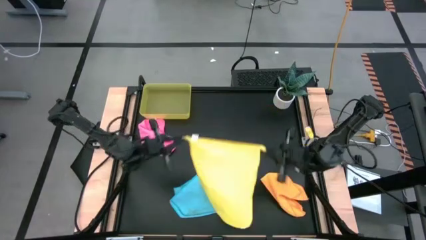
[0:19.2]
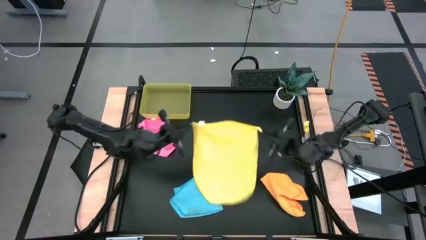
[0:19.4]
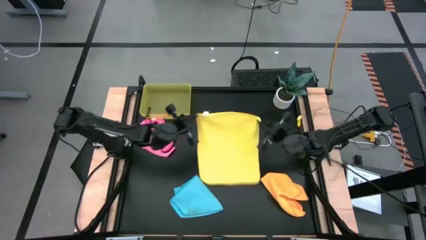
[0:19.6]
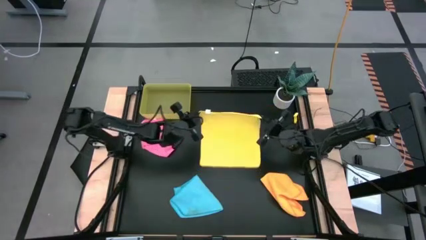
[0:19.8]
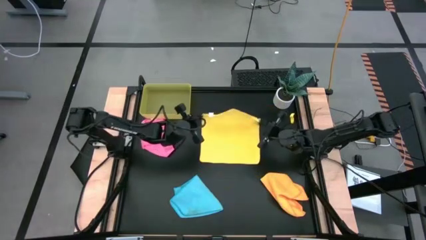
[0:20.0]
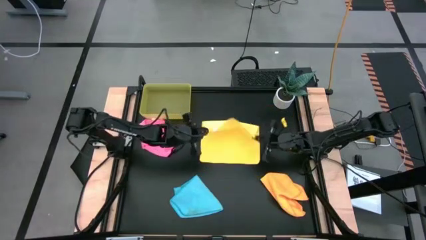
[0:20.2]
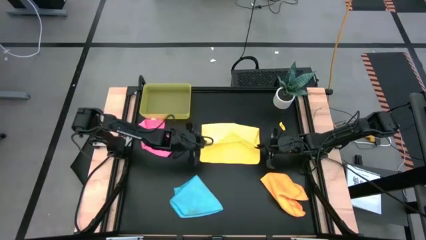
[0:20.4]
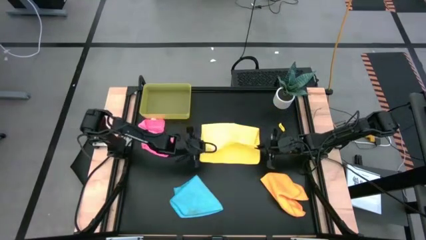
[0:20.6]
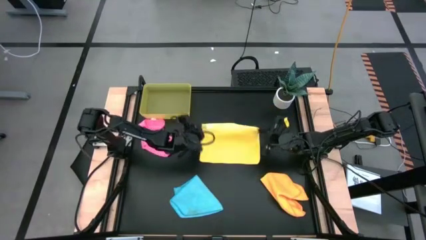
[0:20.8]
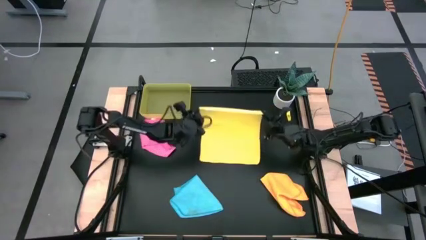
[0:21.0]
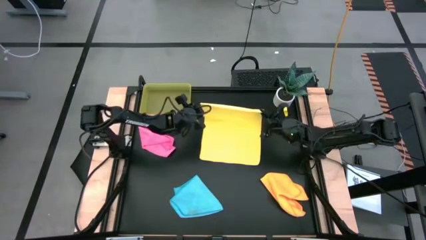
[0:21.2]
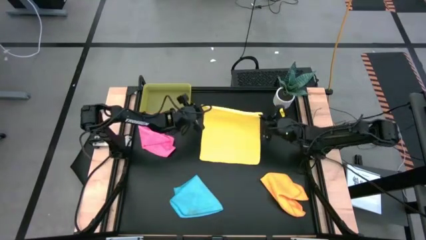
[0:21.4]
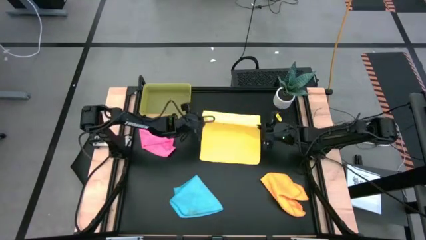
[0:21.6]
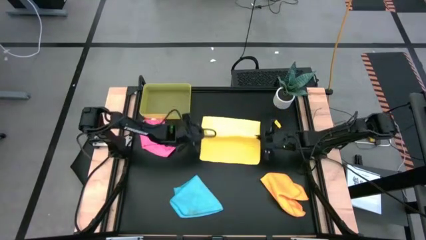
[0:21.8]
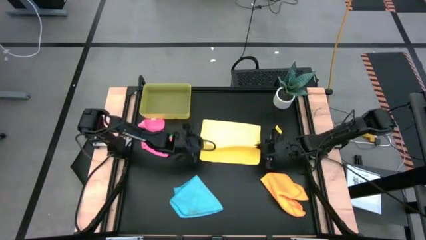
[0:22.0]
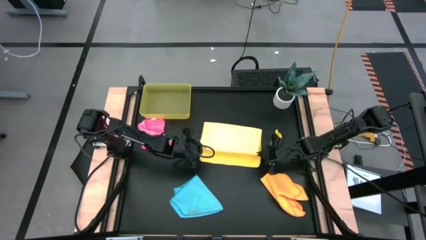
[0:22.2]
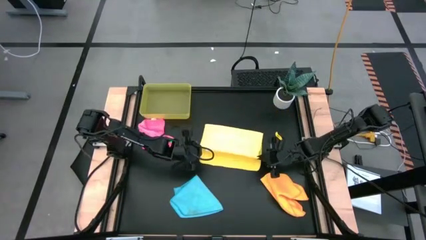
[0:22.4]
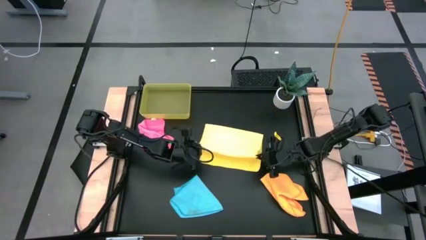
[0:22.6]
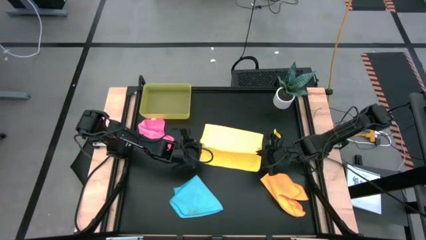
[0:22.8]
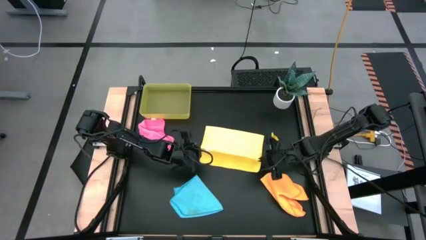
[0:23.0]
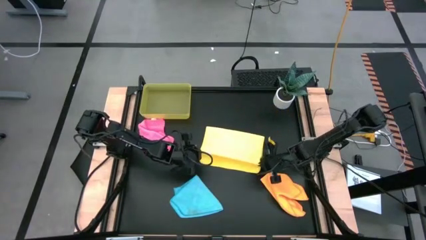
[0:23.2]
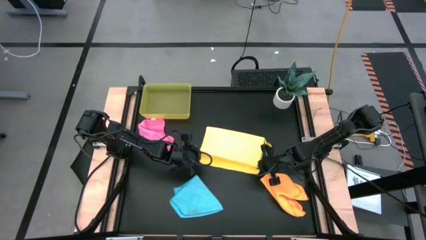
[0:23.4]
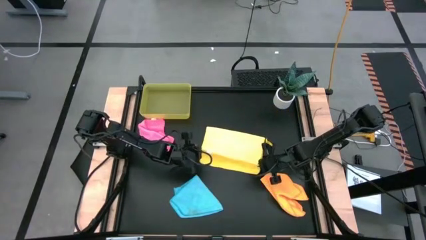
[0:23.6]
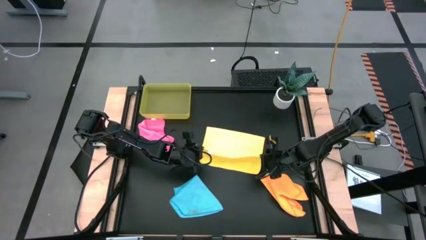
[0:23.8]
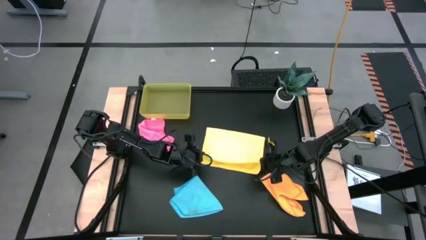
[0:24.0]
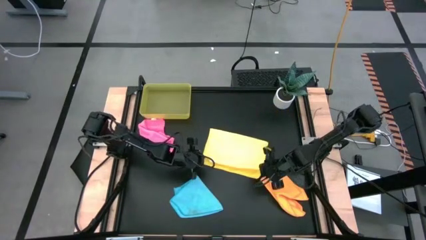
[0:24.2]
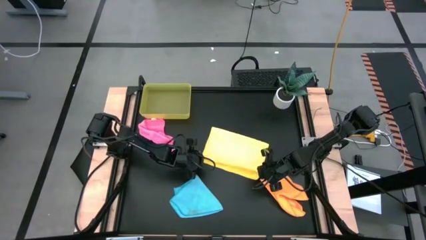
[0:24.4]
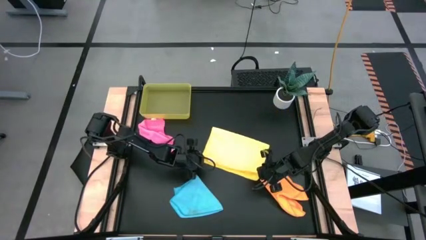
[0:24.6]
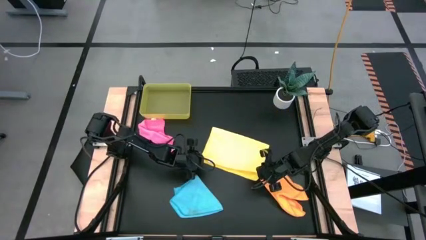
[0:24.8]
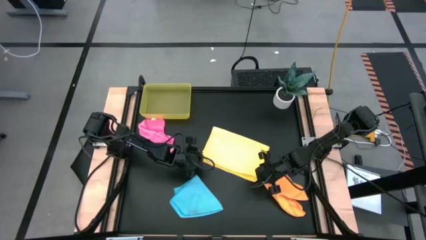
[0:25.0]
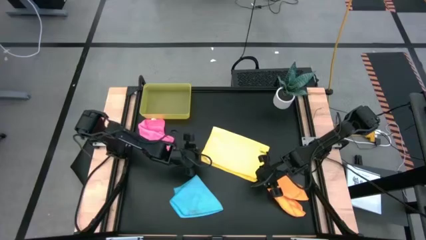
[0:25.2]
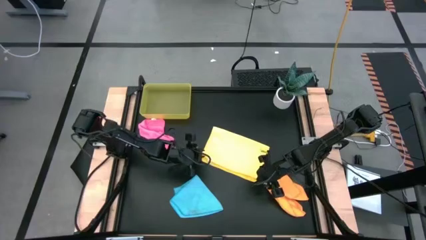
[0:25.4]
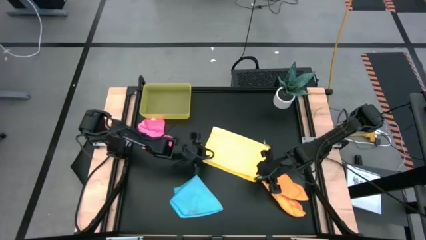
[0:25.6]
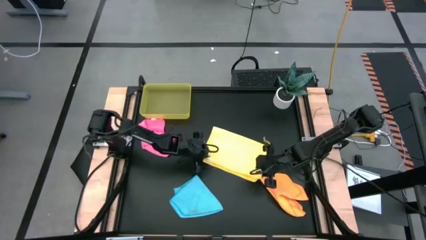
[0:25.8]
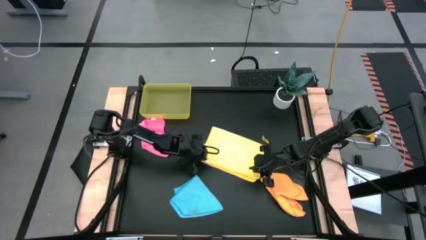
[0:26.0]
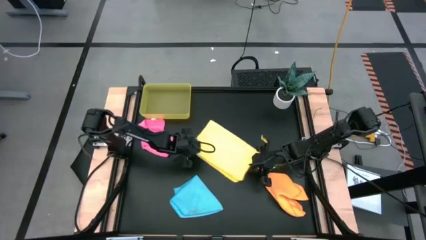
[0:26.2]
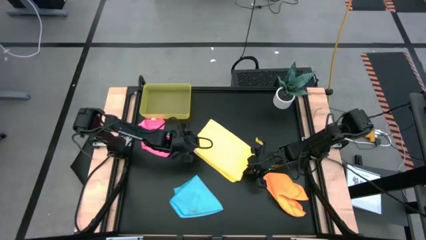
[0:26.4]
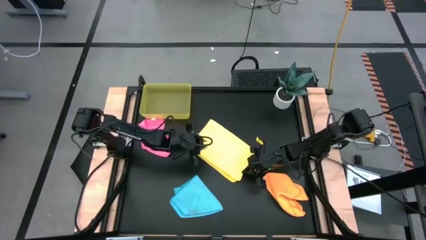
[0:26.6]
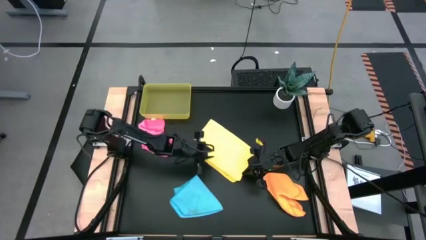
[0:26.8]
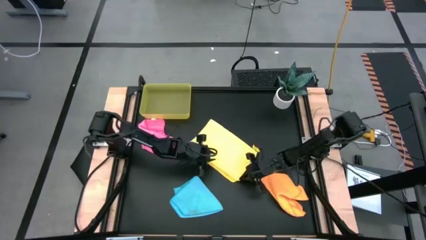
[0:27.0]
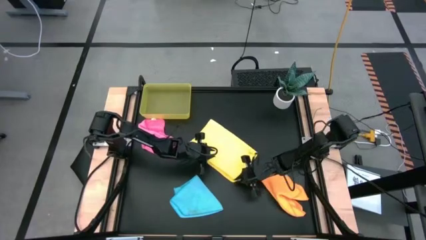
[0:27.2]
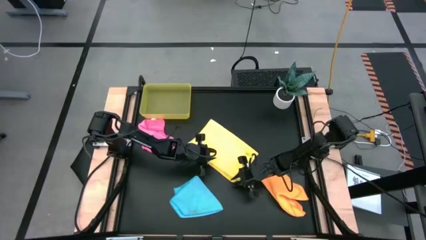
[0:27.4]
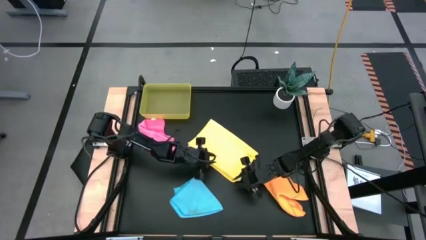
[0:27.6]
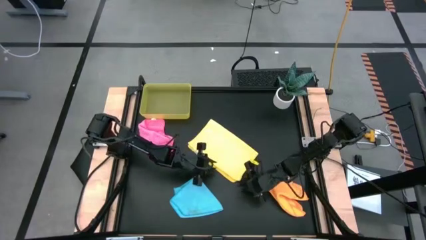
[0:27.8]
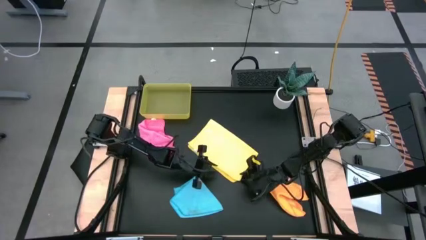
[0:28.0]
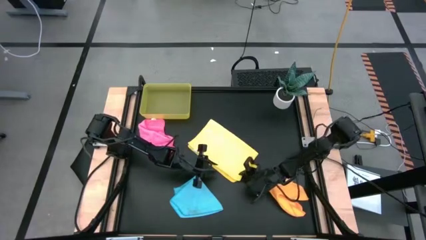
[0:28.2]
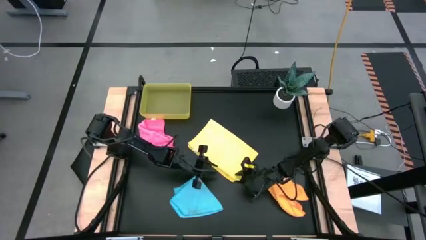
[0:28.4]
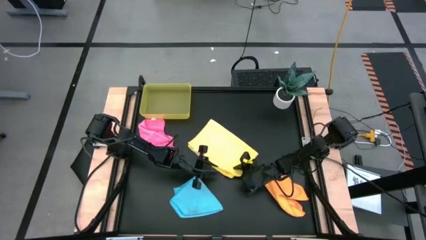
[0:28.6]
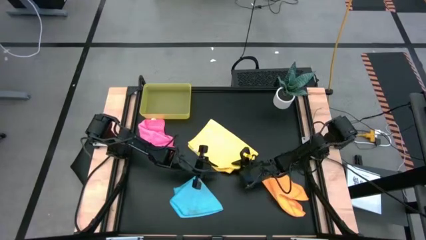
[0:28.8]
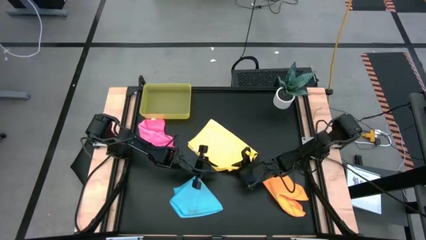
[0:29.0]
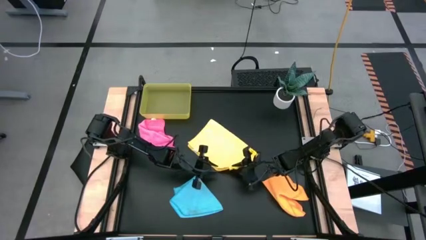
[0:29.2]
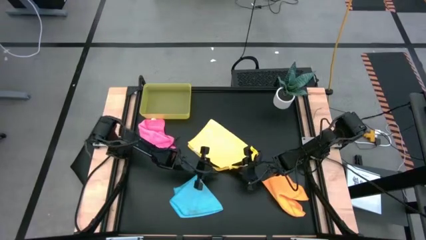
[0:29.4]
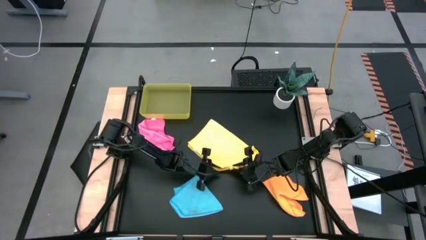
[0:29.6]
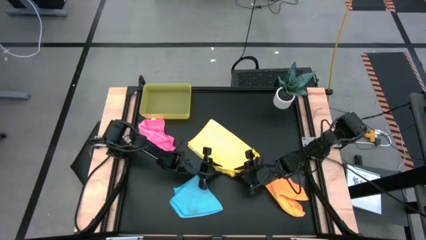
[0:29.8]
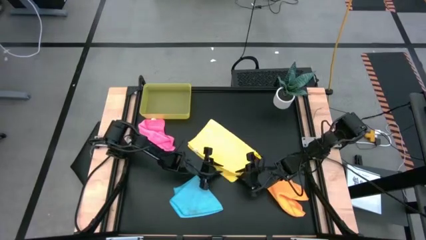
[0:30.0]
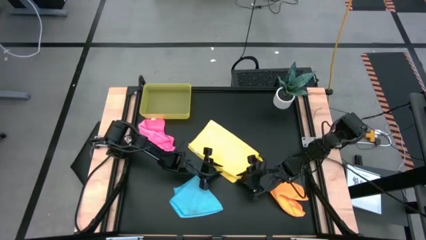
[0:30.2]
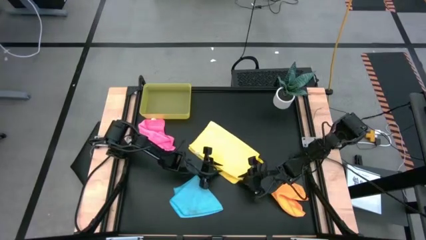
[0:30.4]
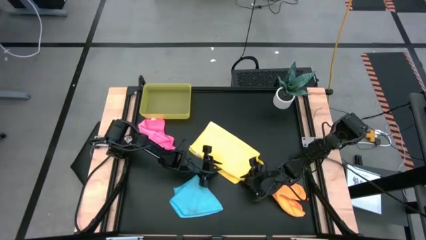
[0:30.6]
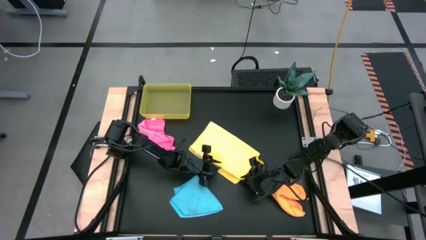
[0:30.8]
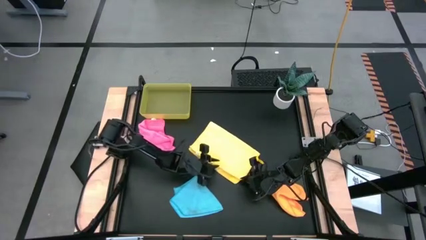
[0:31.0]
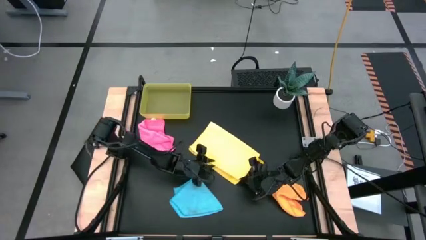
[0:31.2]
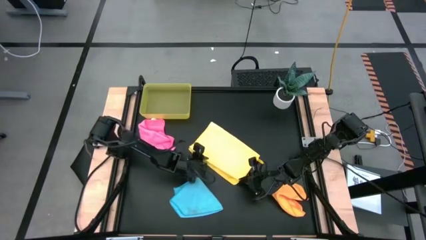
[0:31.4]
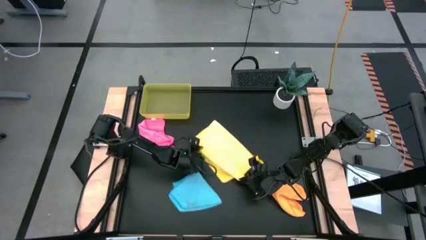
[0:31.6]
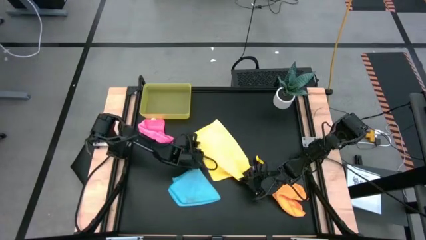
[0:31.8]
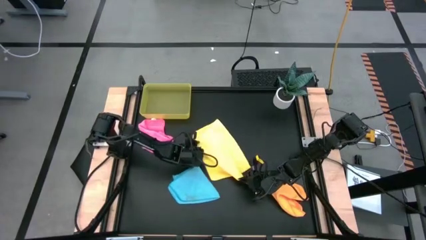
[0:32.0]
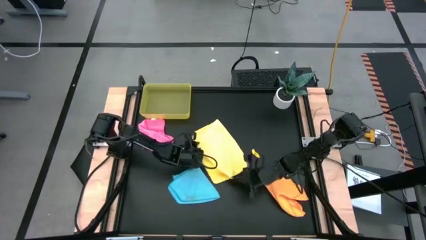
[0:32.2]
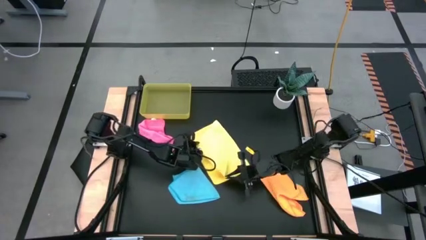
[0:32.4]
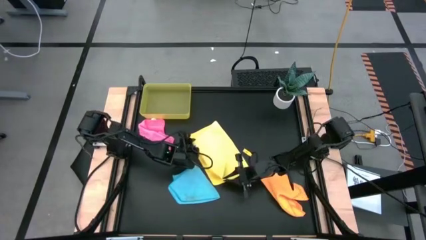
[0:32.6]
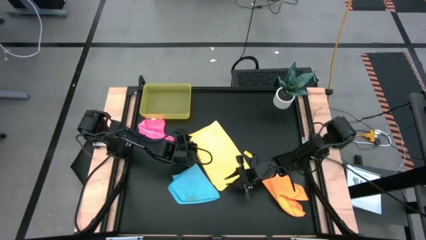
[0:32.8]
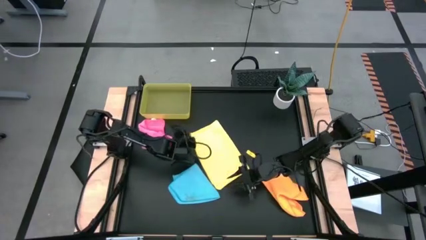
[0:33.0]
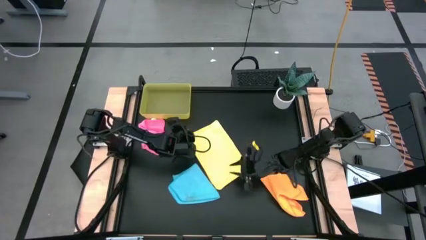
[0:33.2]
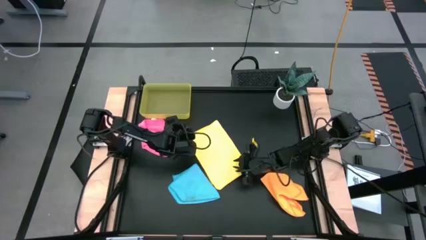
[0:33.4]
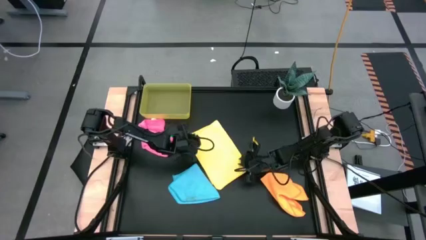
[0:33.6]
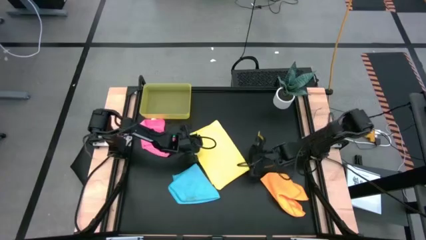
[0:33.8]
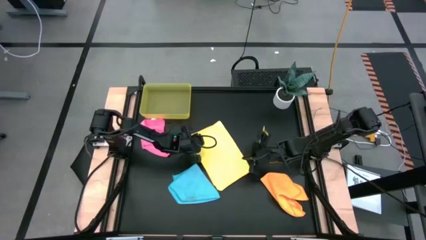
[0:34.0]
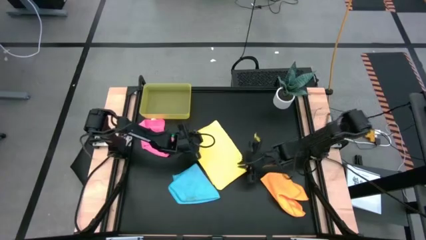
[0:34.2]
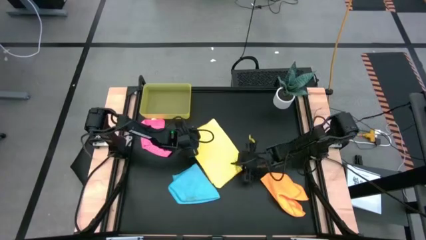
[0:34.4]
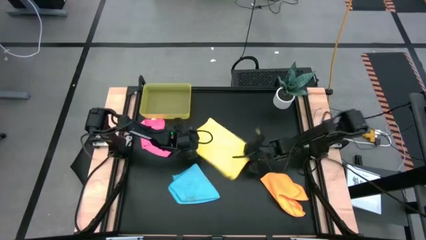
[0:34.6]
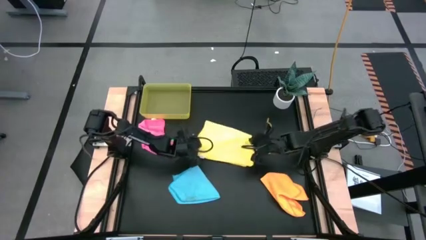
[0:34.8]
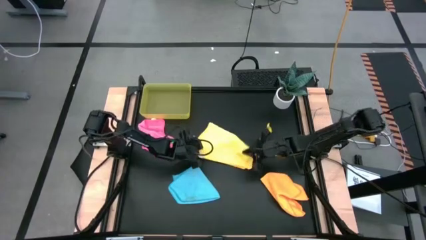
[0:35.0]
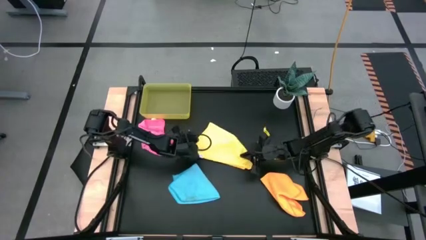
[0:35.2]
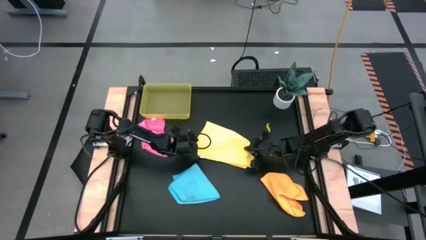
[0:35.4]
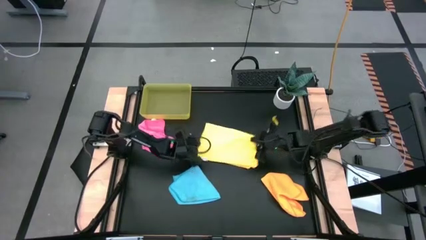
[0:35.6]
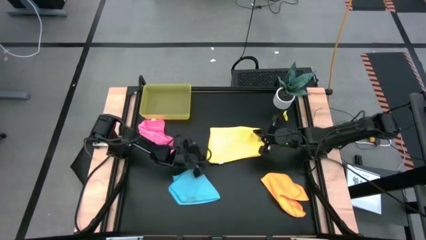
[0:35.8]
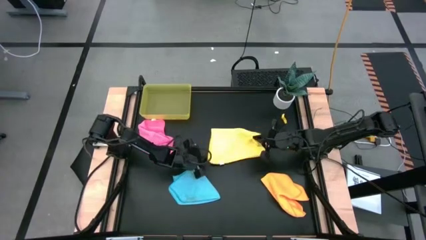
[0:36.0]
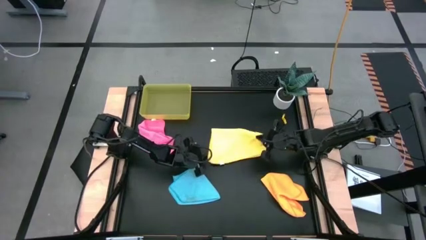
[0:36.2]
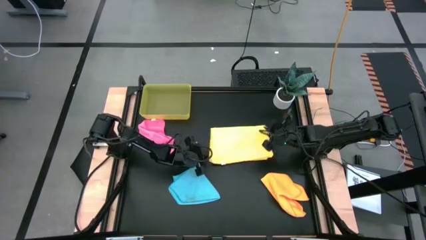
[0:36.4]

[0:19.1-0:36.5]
Task: Fold microfiber towels
Fold the yellow microfiber cloth
